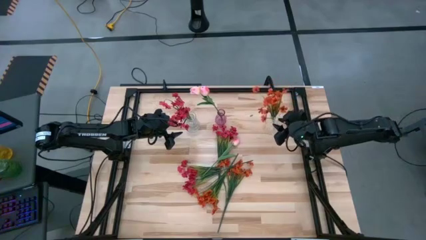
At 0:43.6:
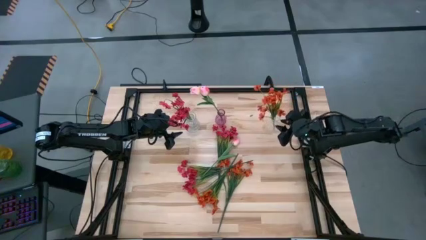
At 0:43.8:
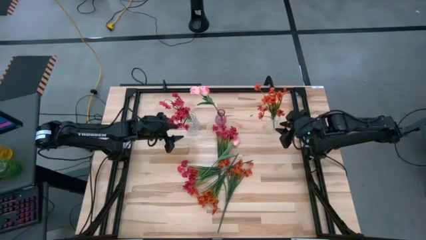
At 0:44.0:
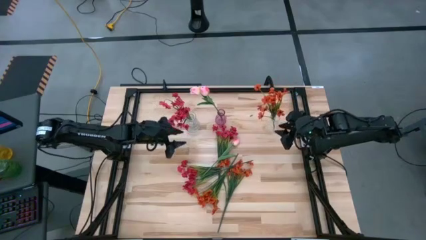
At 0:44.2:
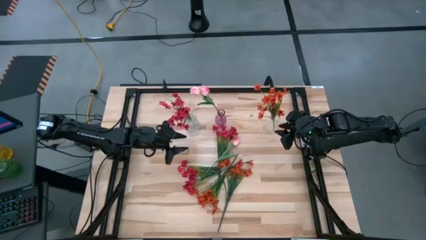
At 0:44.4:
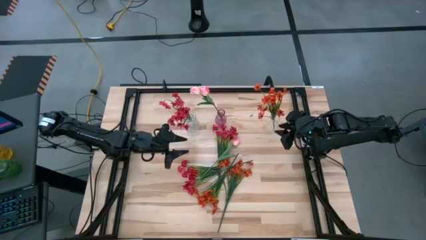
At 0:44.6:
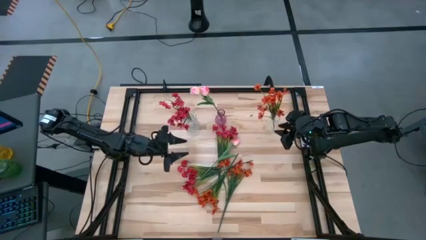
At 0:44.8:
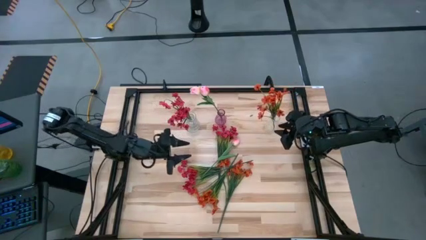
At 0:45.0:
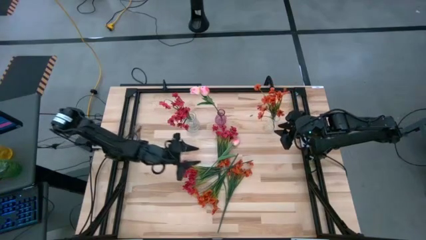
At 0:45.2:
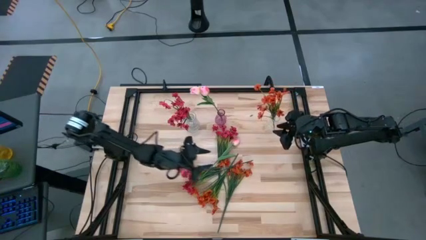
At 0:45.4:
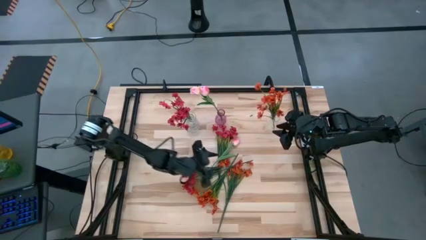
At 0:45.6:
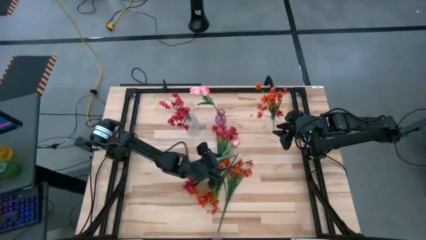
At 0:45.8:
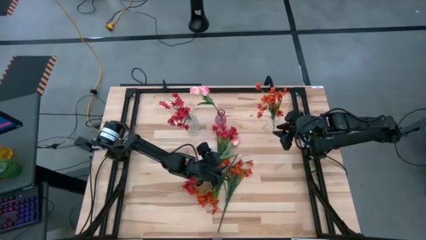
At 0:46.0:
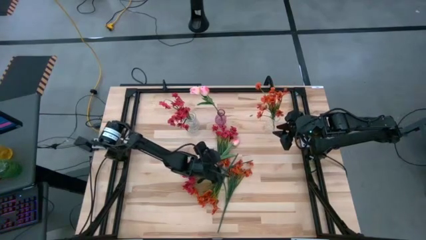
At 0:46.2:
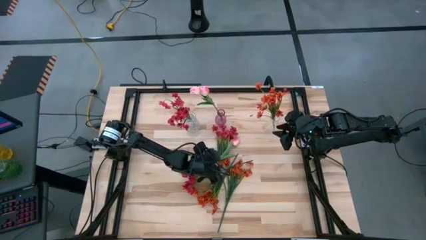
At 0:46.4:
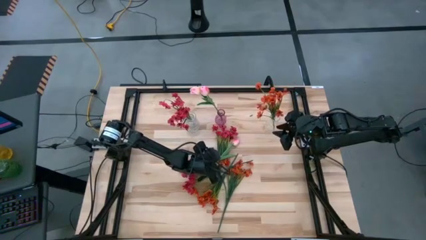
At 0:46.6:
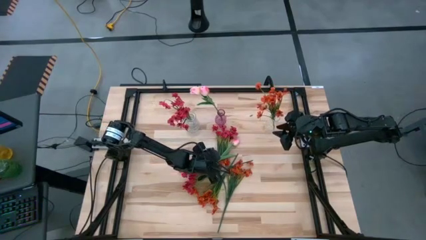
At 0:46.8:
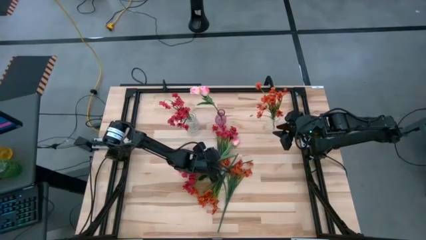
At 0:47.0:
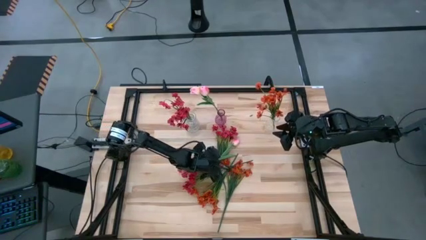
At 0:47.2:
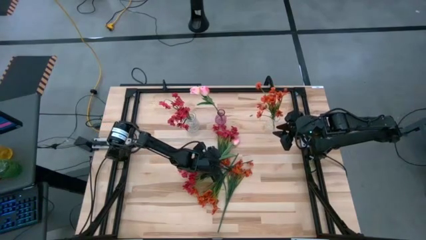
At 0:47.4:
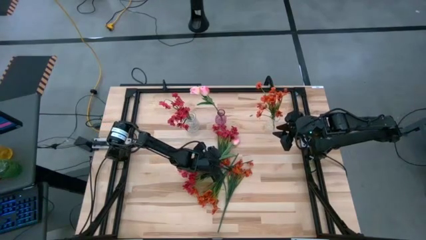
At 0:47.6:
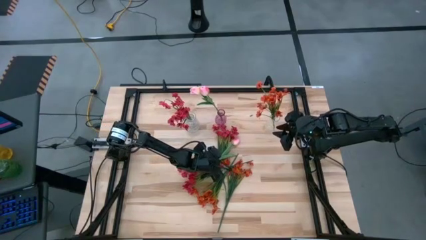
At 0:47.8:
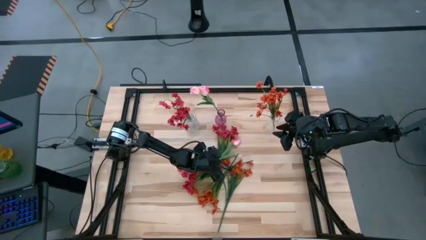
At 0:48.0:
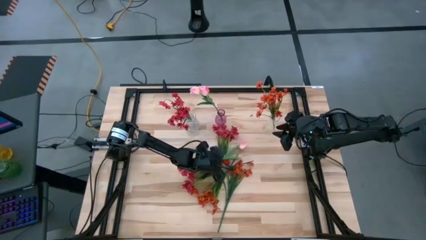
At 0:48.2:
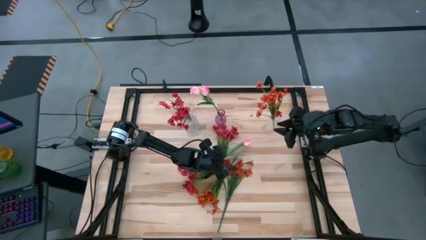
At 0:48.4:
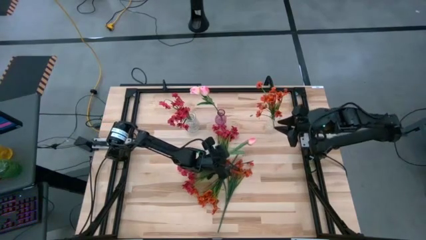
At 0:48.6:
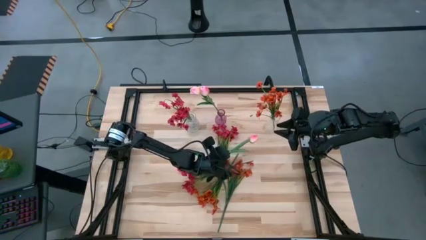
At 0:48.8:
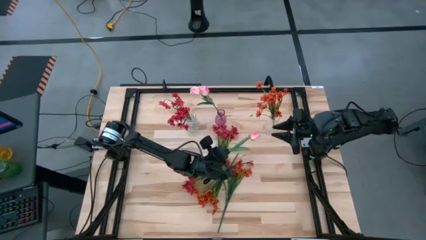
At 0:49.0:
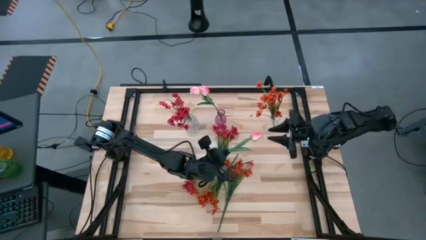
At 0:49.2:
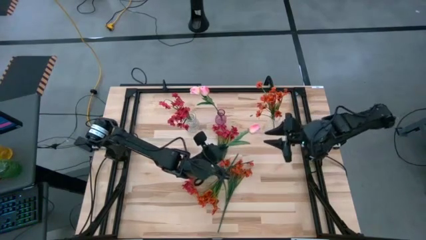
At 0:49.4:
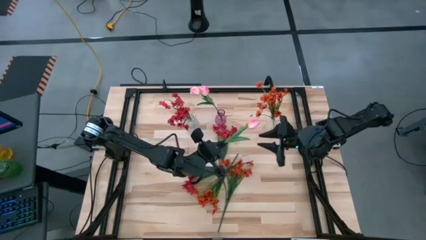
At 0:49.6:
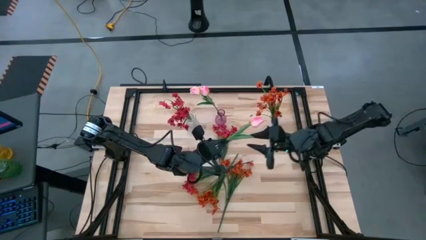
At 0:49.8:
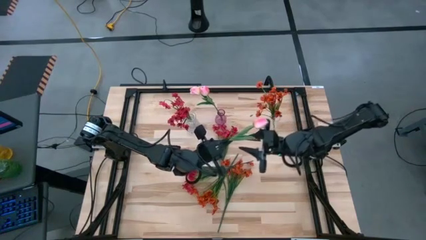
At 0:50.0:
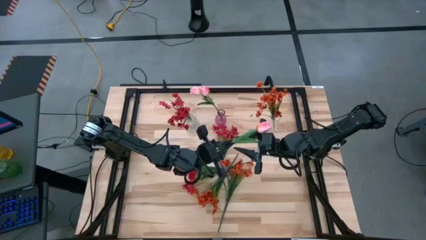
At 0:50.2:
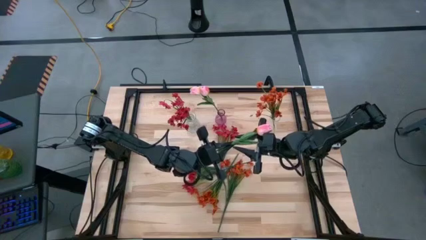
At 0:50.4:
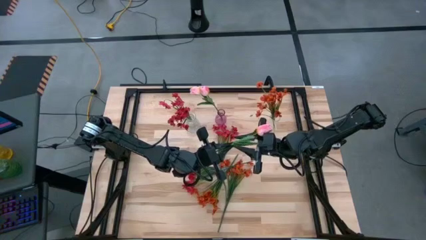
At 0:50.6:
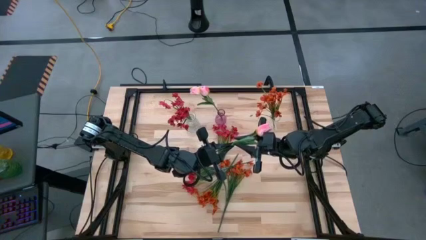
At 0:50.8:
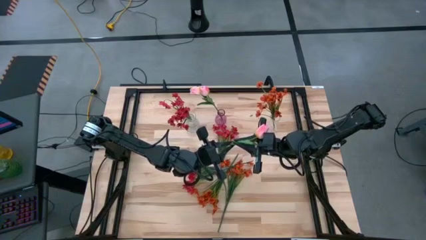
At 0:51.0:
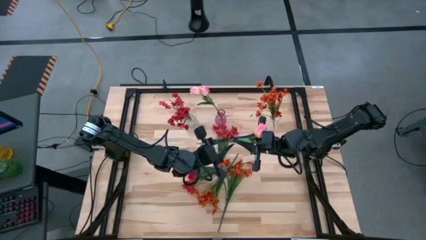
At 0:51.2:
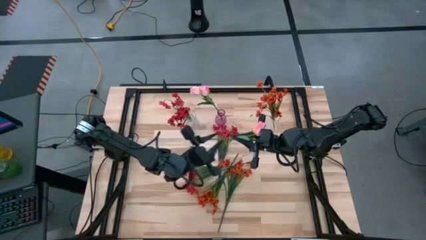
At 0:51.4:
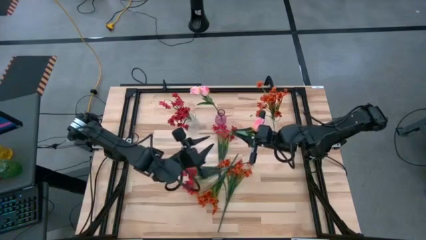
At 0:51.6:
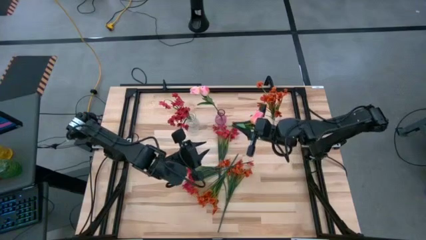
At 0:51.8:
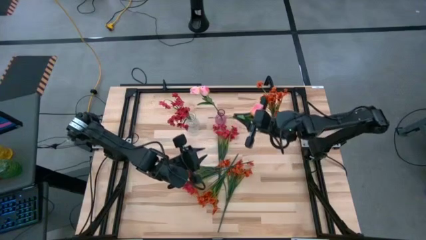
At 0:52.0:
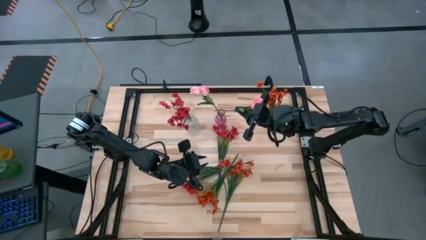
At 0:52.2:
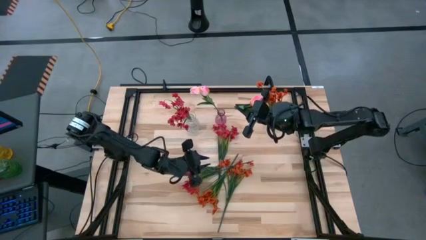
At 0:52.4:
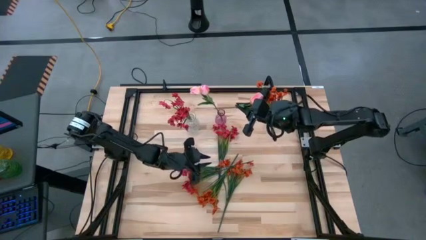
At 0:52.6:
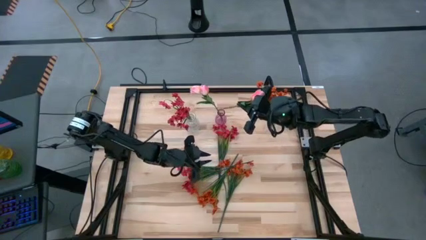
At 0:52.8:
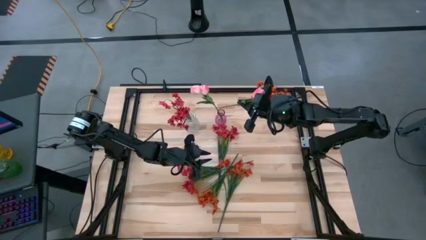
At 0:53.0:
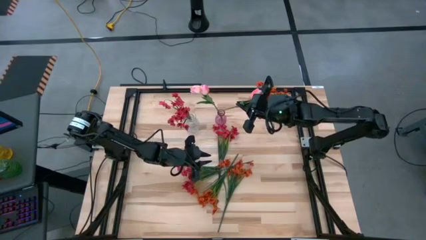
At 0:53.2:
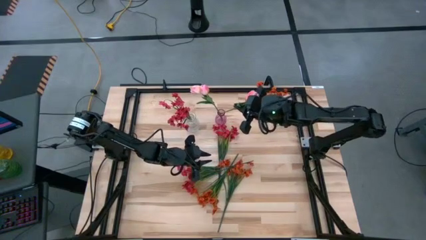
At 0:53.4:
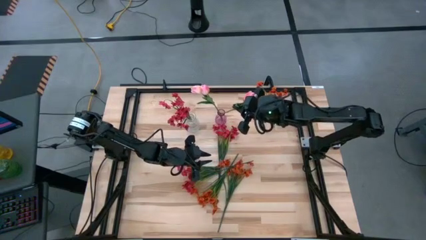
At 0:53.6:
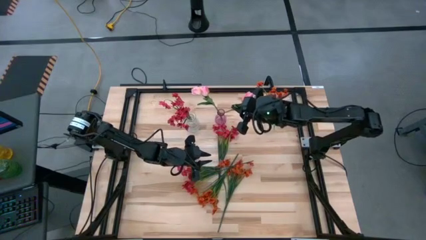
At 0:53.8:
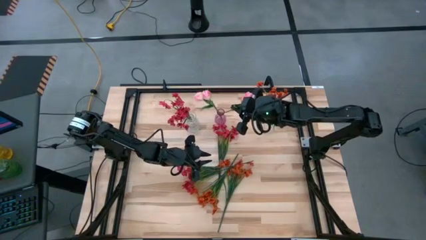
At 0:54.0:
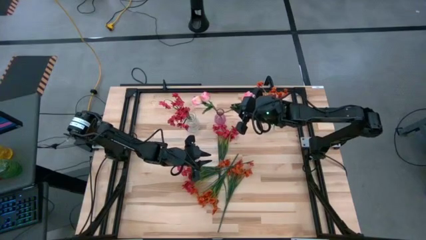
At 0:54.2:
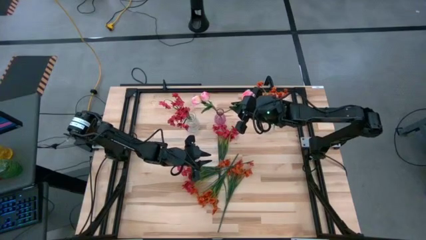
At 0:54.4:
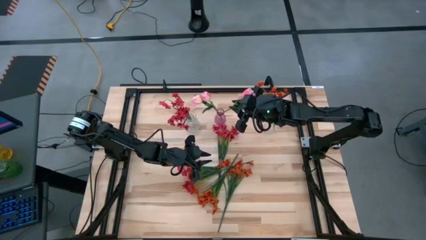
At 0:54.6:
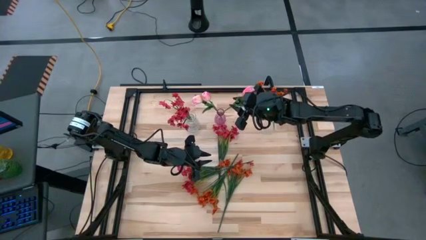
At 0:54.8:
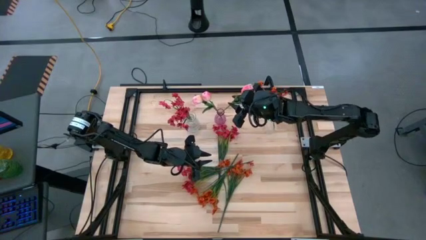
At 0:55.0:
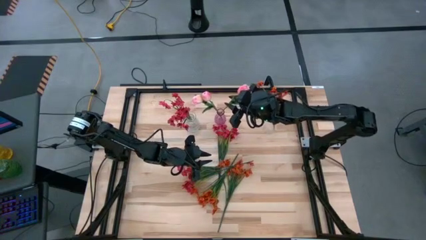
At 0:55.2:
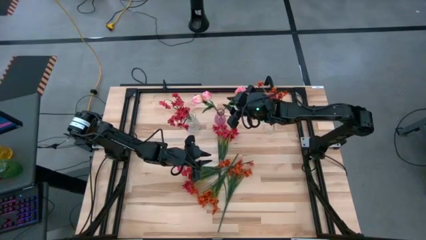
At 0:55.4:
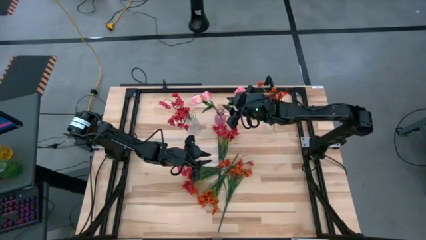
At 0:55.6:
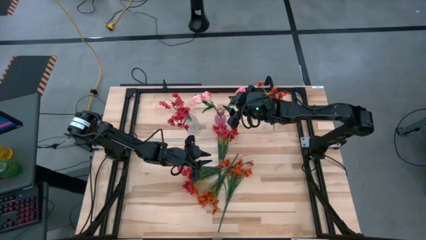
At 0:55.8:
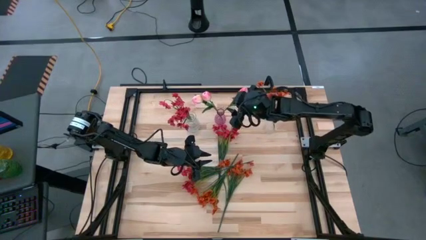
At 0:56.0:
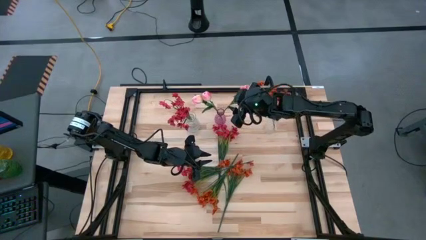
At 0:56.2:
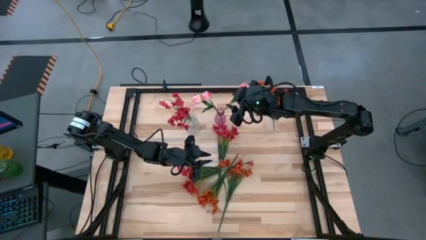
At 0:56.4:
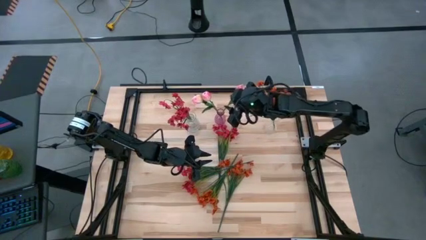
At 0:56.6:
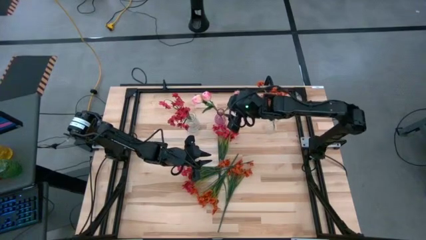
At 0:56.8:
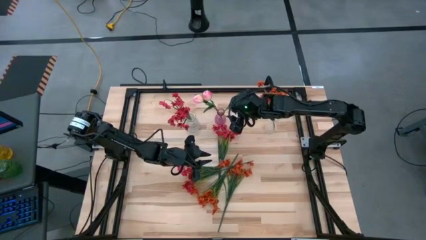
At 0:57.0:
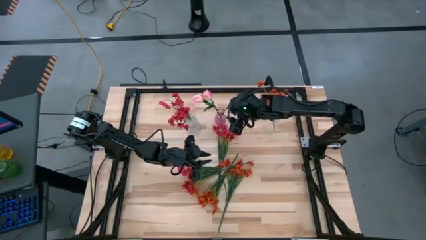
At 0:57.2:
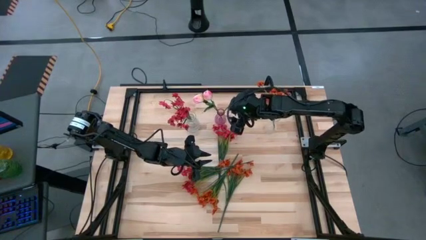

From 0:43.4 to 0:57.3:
Task: Sort flowers into vase by color
Put the pink flower into the purple vase

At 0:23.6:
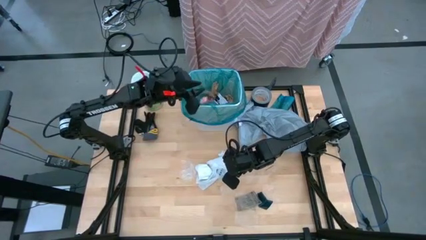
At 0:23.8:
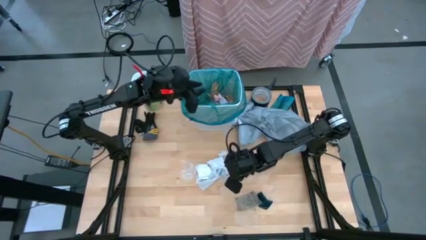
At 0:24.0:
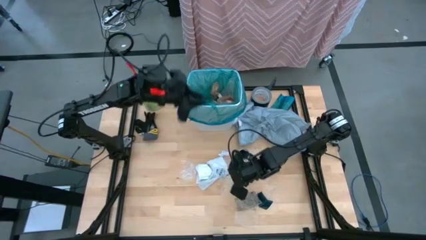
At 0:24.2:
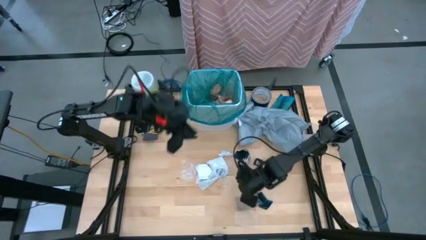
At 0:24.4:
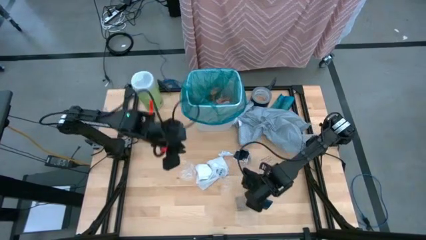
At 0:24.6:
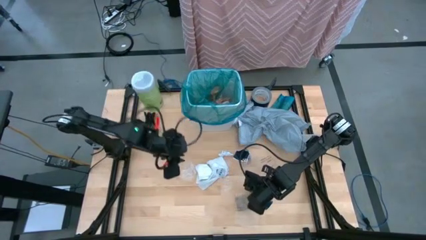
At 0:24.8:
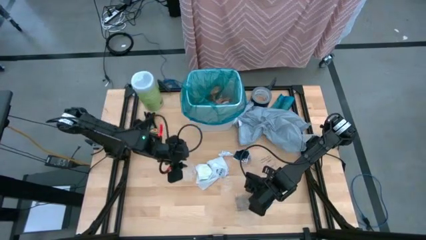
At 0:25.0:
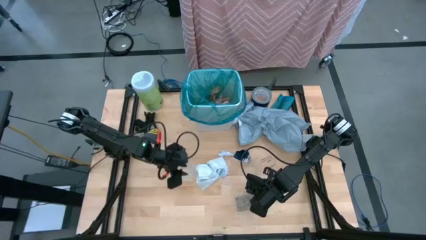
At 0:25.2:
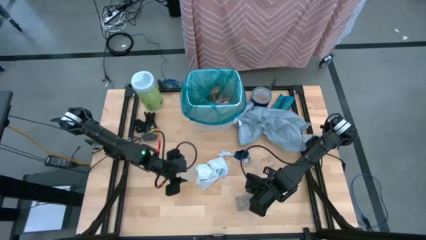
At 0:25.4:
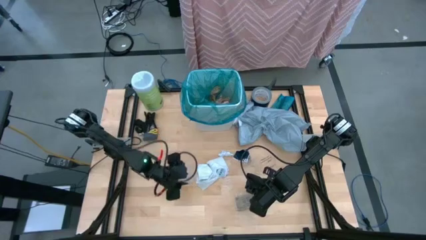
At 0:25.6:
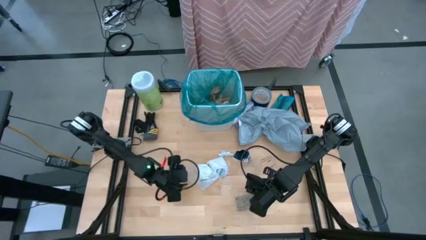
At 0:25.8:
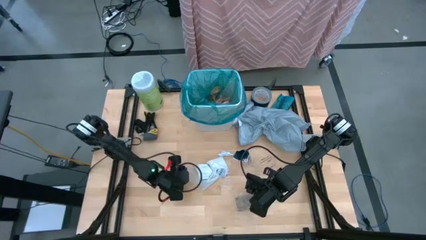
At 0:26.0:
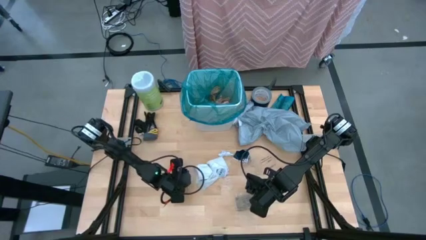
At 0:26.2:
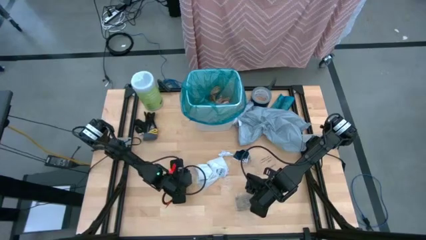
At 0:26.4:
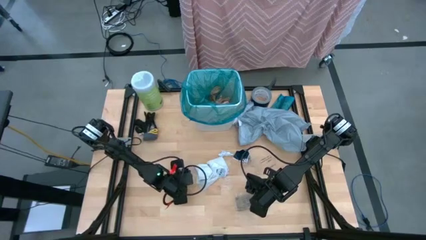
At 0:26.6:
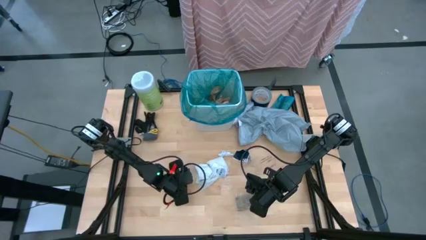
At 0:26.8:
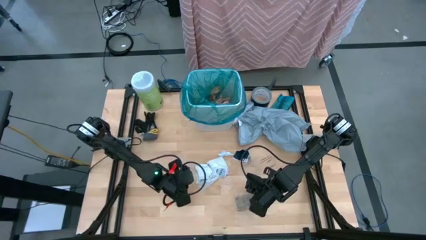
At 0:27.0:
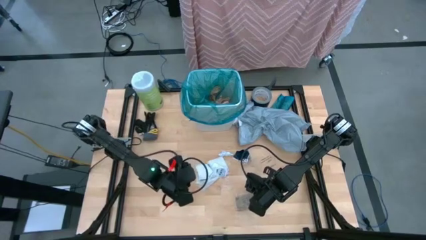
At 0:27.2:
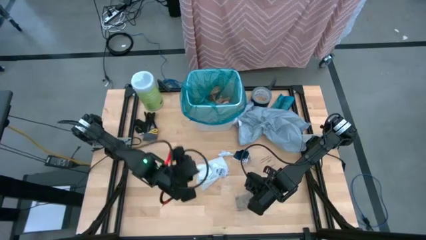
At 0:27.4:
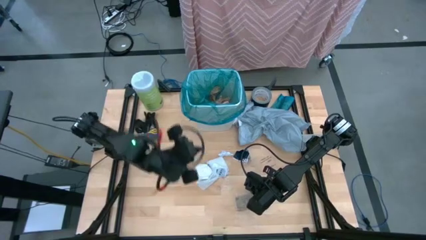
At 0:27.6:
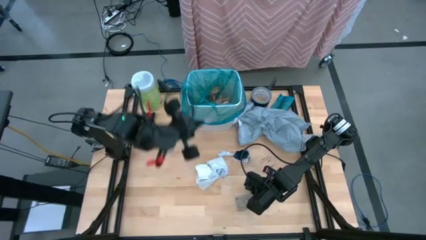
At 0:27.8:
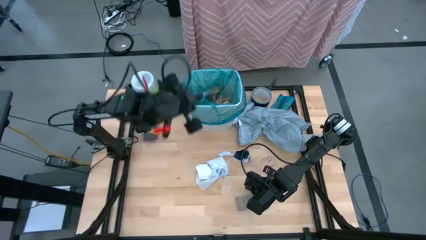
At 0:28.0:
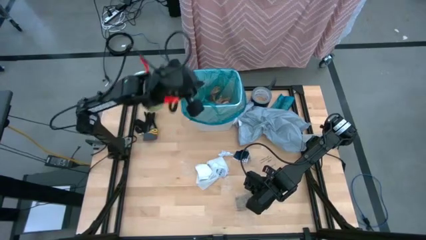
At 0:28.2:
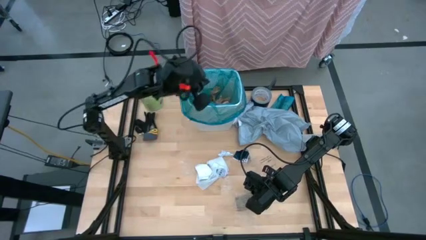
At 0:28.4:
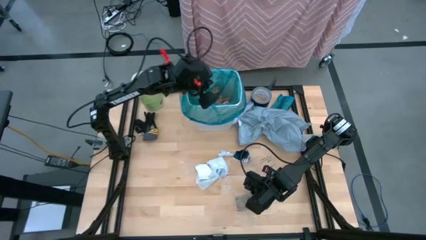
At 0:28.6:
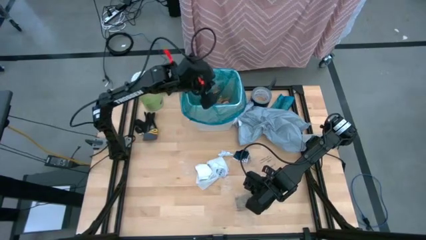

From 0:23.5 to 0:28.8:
Task: place trash/remove bag and relplace
Put the transparent plastic material into the trash bin
